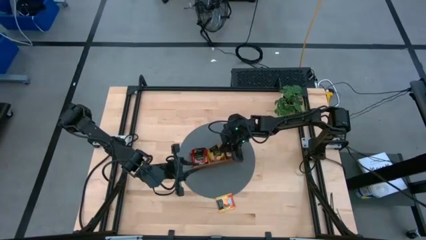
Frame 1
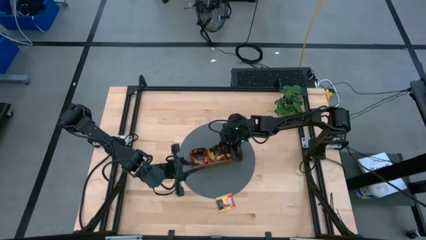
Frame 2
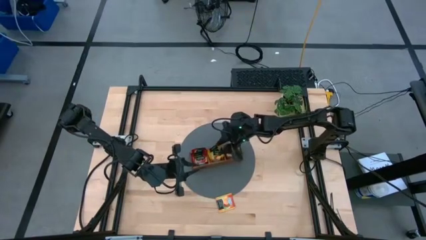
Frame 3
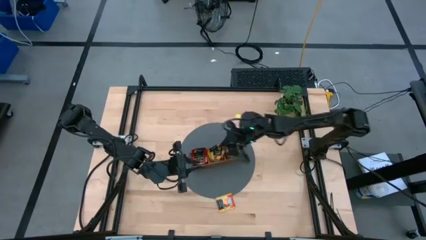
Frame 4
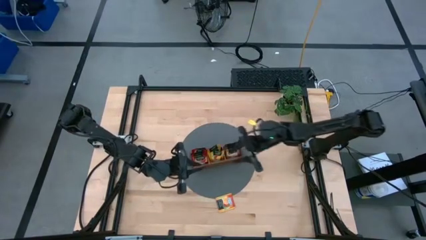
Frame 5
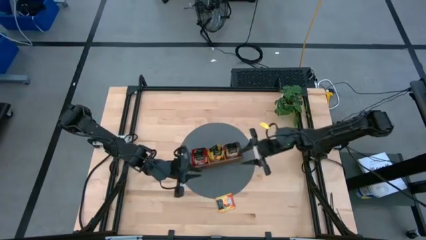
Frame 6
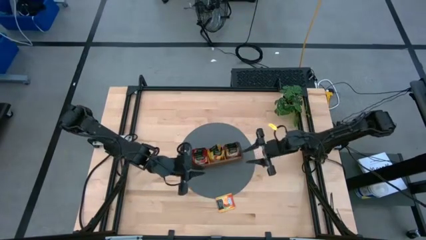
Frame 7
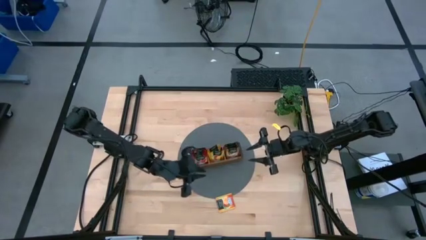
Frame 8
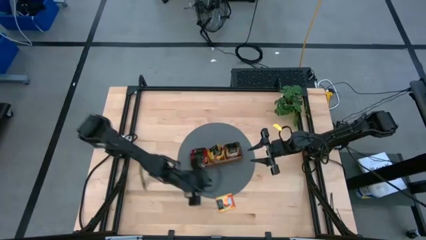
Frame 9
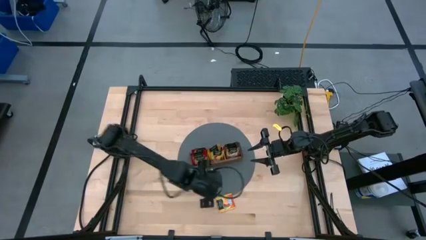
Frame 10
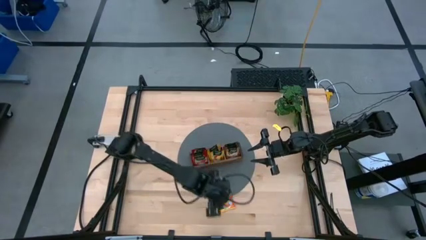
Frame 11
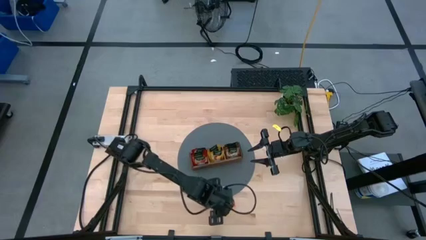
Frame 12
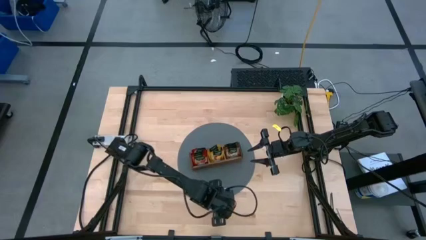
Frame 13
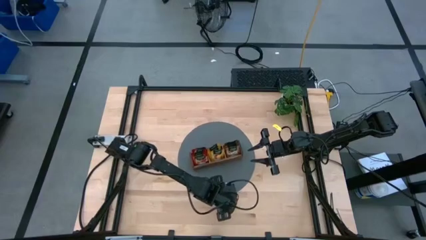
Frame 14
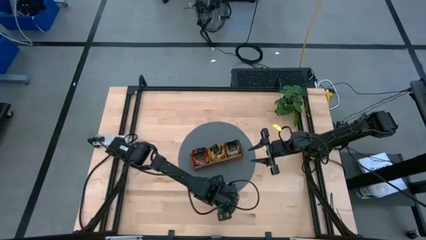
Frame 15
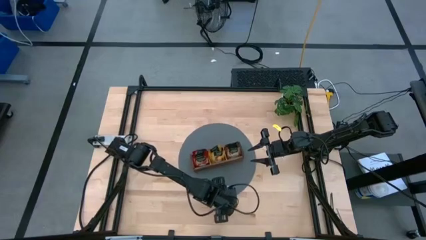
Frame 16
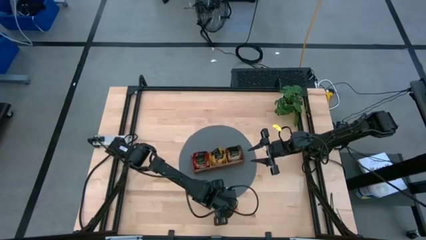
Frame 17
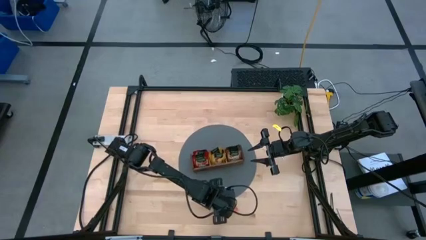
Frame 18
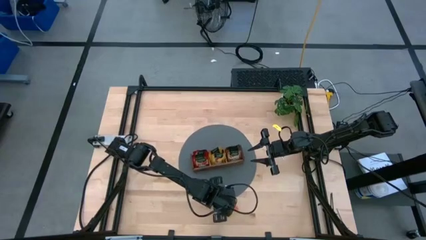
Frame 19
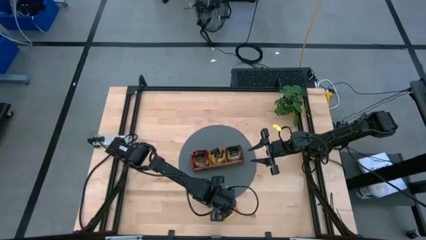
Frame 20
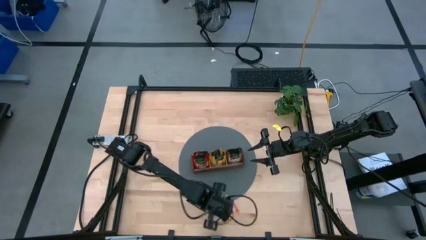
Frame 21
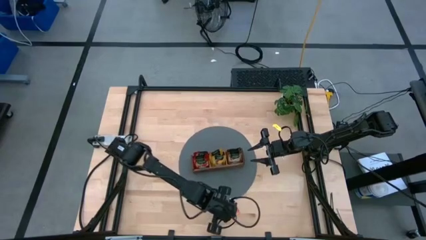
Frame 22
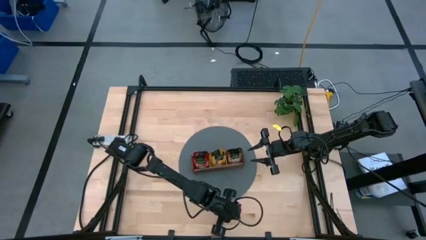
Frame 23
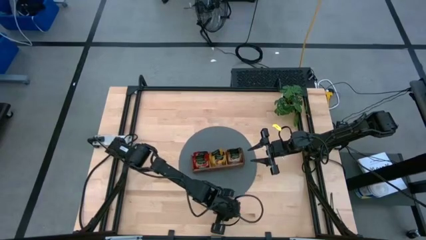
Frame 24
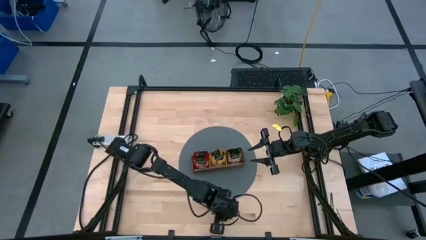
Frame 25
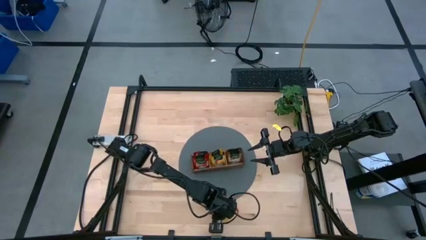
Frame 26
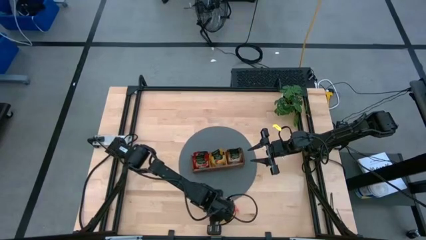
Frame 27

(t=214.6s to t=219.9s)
Task: Pick & Place Tea
Put the yellow tea bag into the middle section of the wooden organizer

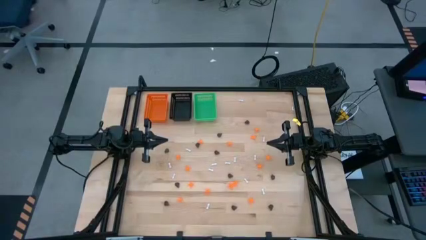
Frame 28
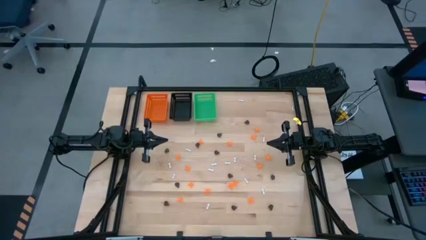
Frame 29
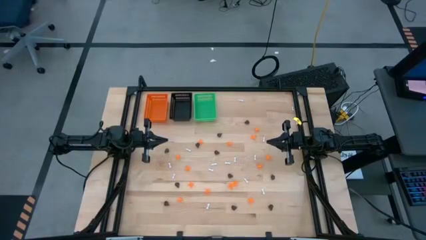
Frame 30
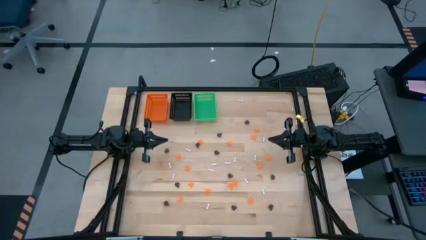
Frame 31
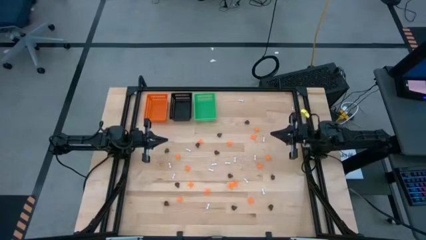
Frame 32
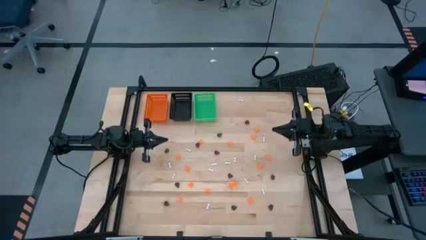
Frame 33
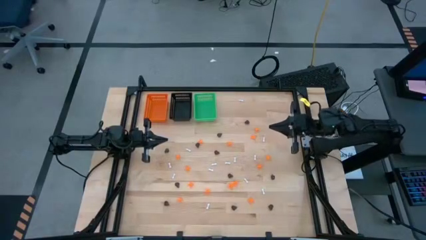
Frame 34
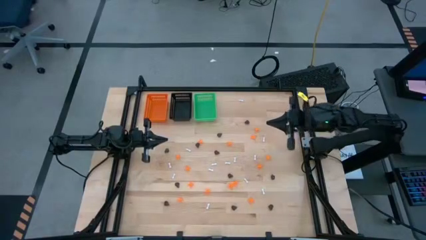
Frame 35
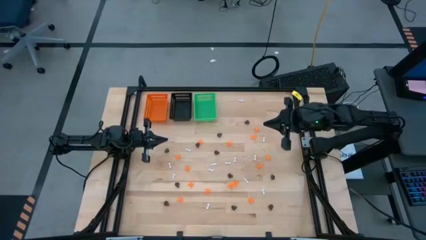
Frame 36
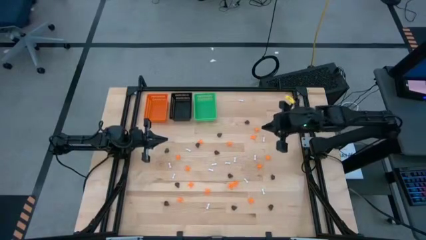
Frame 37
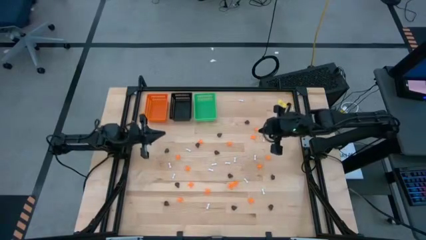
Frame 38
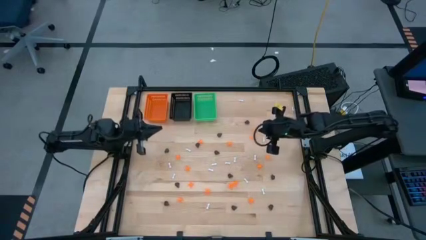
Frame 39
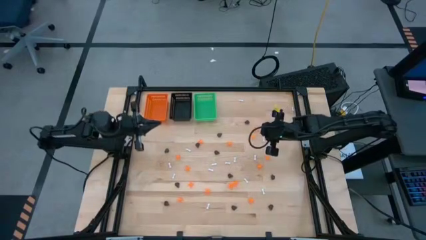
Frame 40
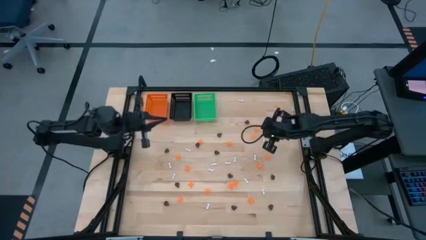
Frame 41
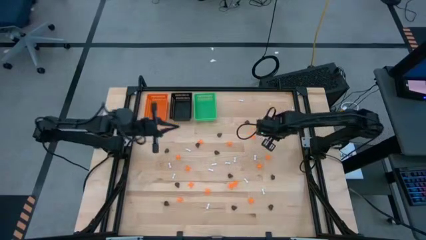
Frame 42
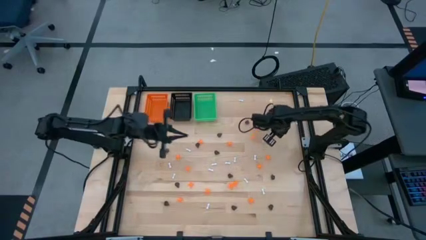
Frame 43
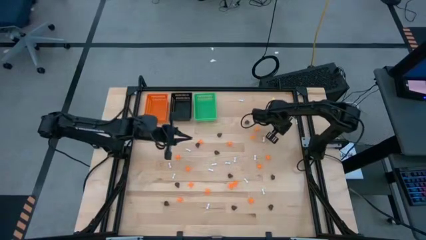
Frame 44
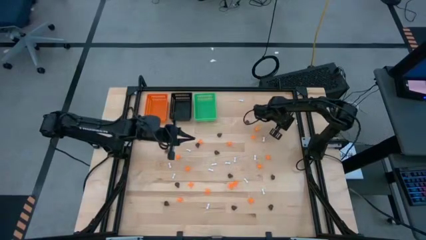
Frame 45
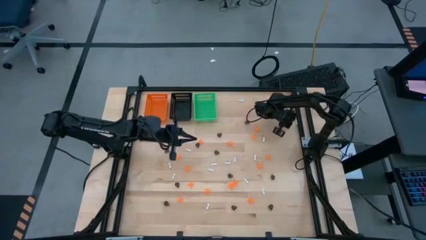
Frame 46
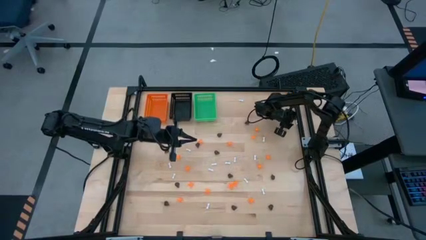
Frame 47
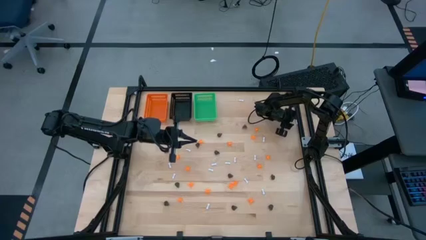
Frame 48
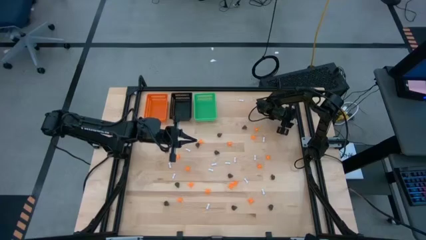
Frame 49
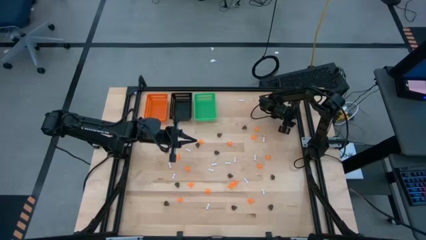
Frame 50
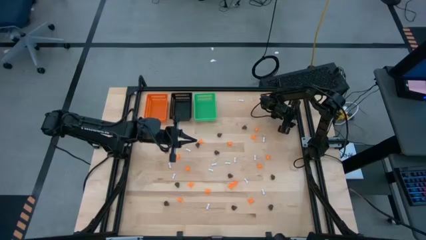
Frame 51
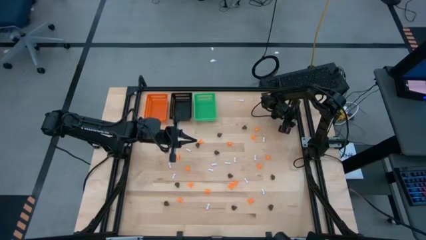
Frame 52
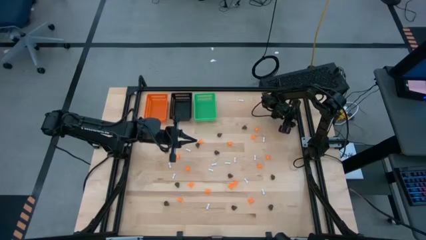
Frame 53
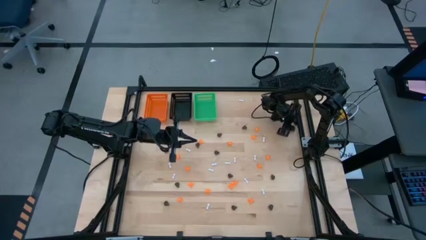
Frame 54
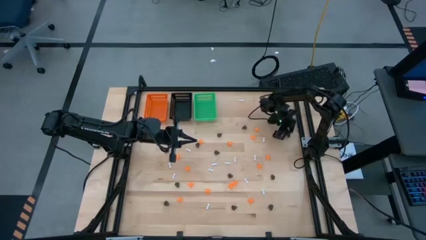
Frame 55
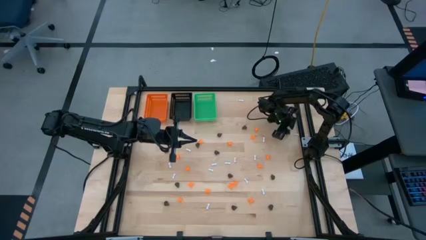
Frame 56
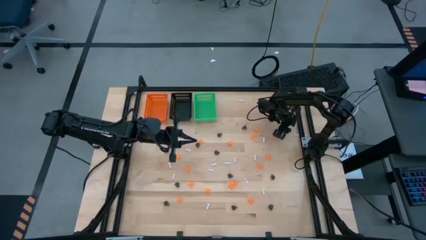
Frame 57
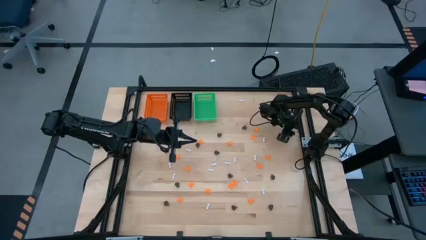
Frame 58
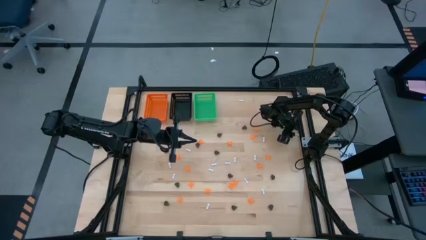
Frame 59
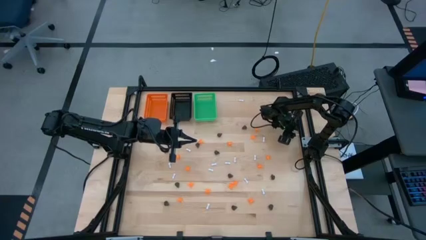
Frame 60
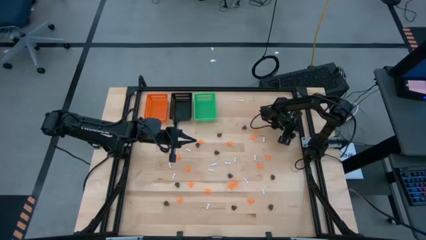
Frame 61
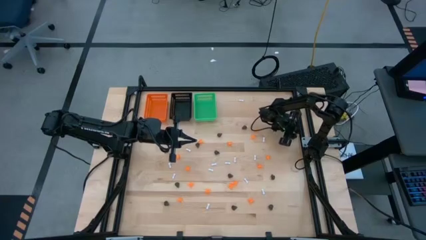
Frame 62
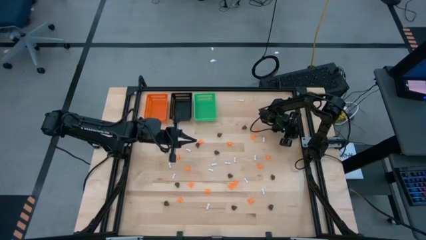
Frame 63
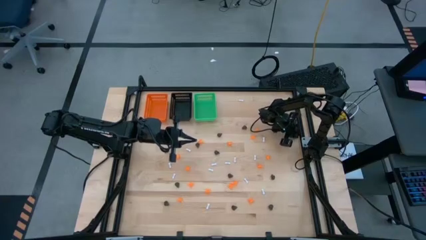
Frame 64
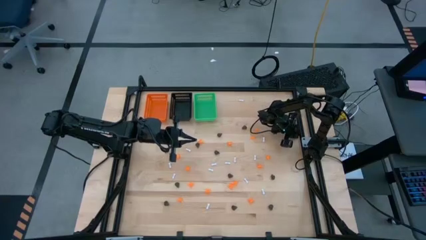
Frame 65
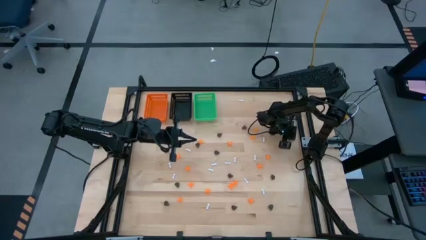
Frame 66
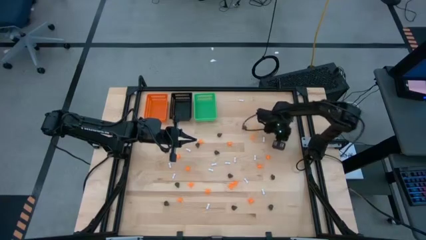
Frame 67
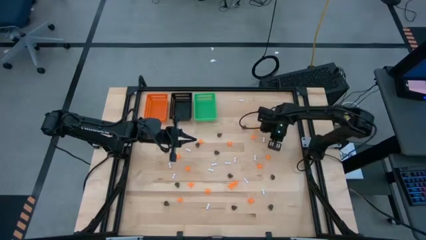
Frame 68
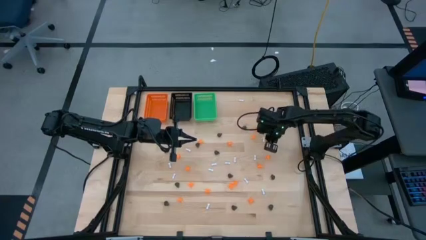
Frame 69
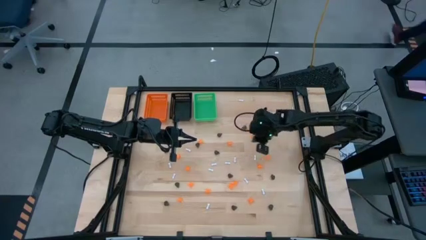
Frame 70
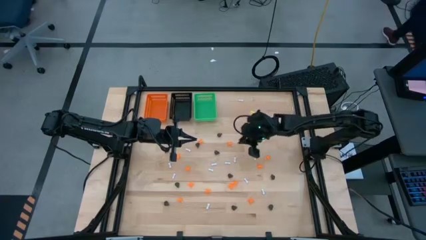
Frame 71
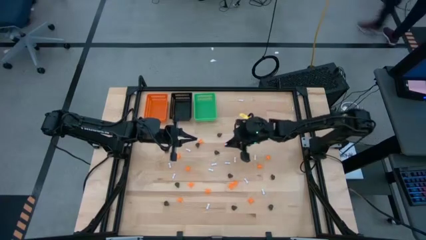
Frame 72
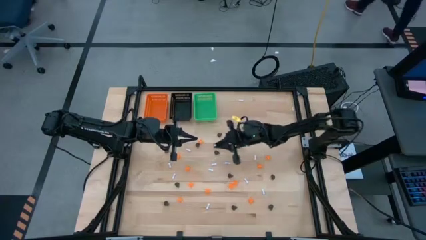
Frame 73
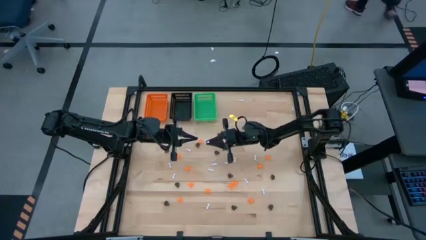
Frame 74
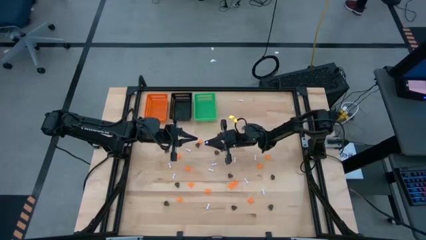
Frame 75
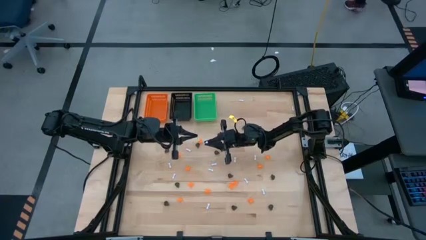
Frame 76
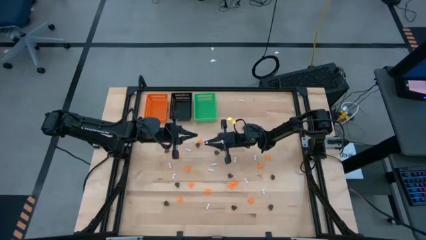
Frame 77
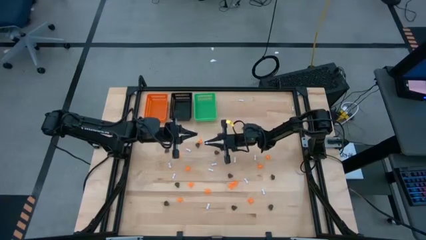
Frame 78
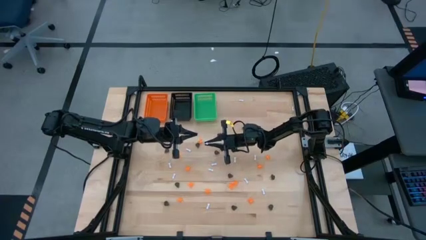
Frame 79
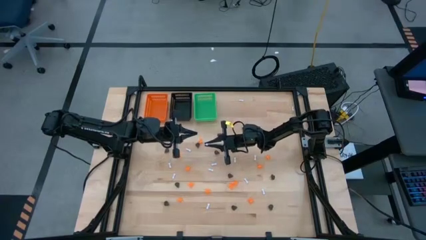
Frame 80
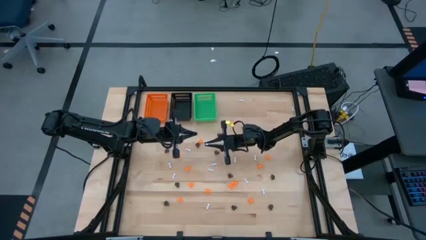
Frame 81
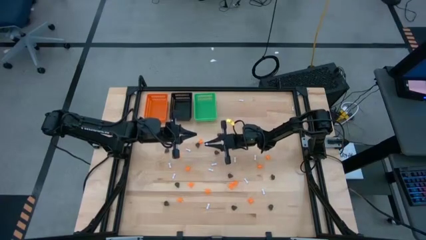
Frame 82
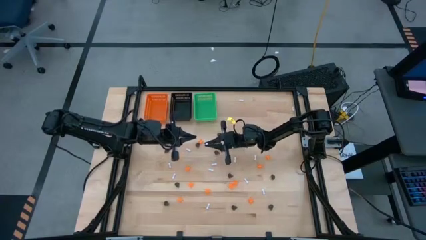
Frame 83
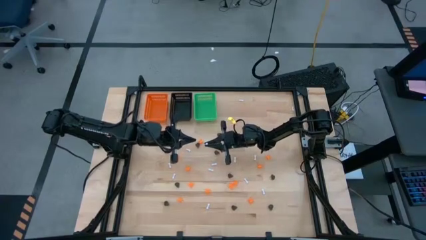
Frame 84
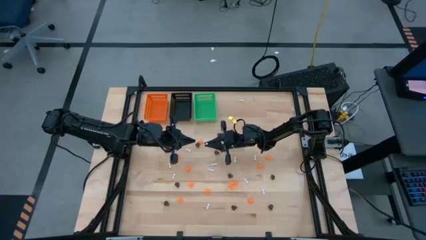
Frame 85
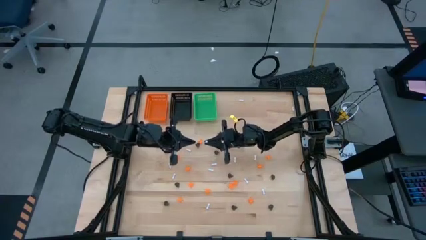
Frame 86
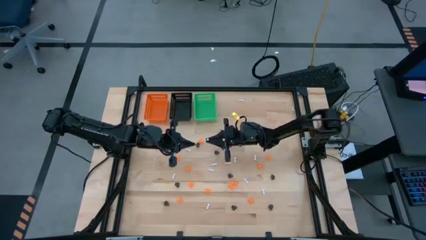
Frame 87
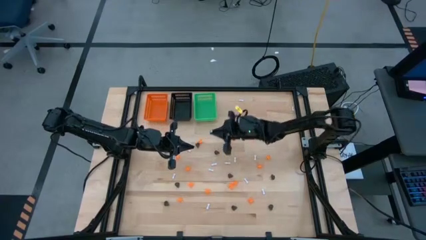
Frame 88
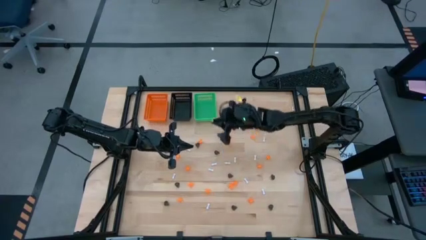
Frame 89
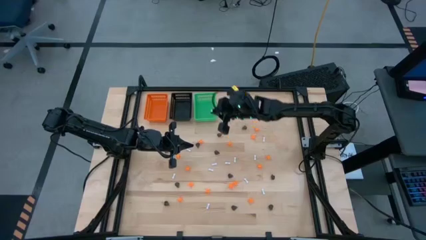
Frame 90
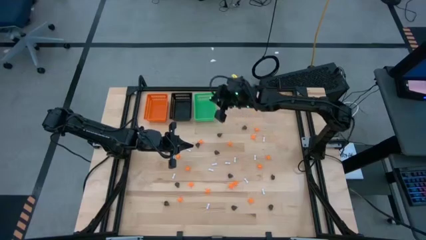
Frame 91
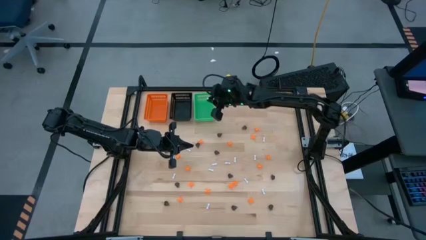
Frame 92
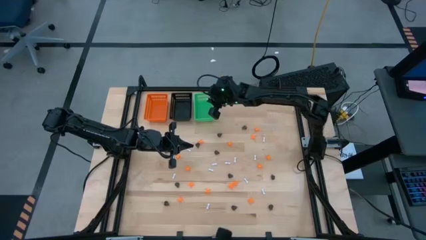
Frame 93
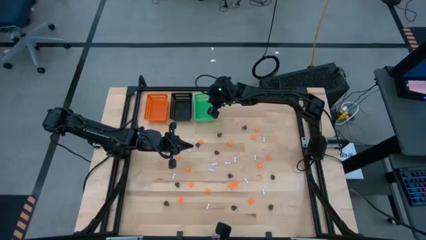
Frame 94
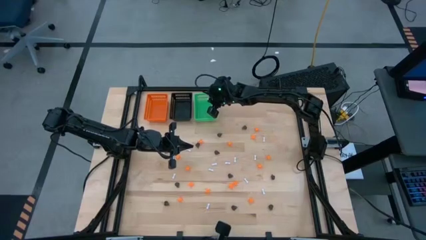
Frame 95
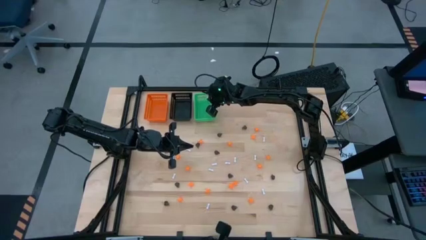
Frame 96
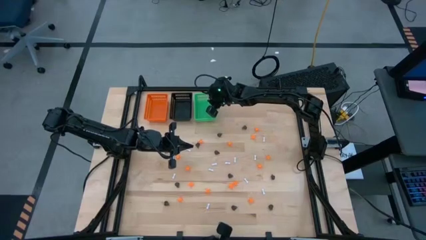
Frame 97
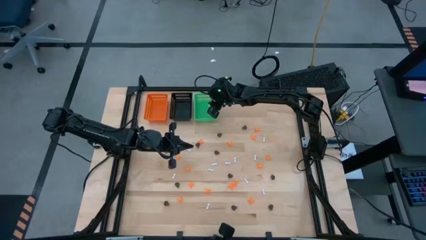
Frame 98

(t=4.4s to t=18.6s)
Task: Sort Halloween decoration
Put the white bone toy into the green bin
